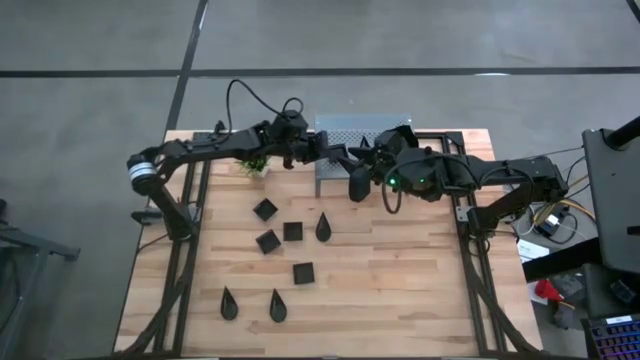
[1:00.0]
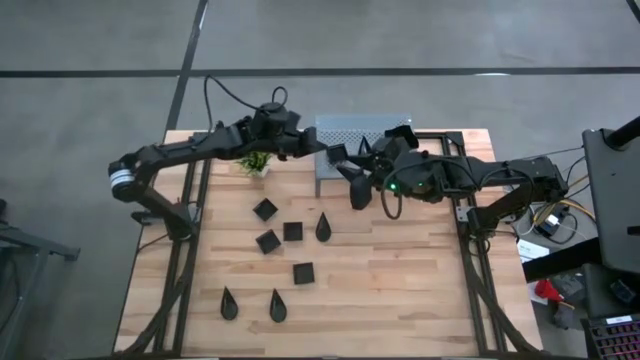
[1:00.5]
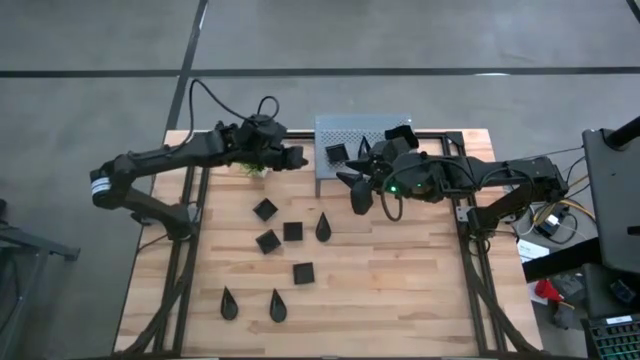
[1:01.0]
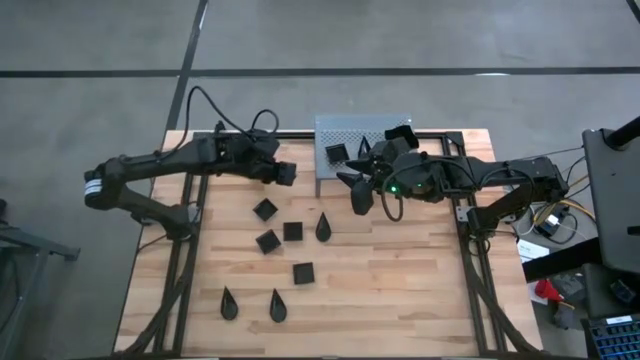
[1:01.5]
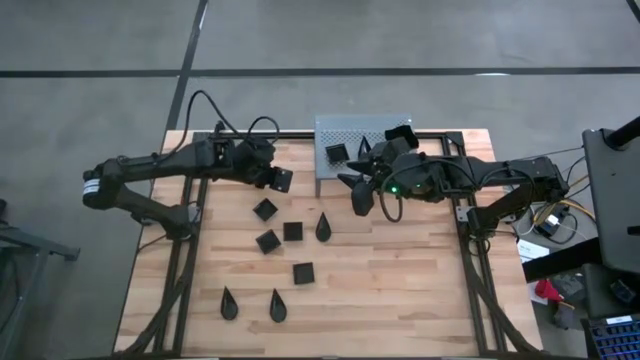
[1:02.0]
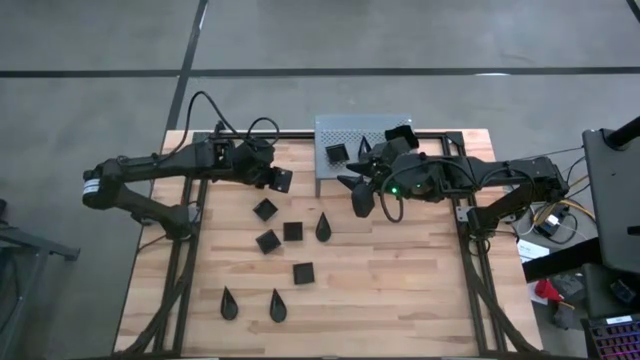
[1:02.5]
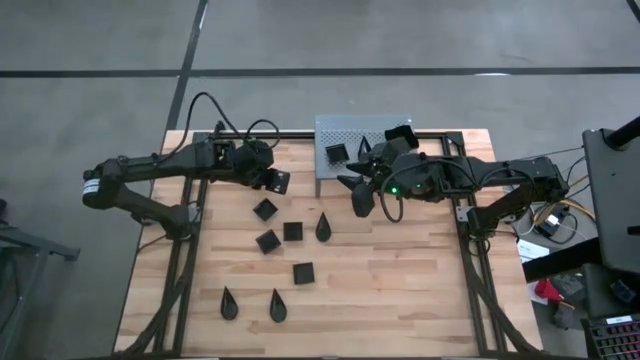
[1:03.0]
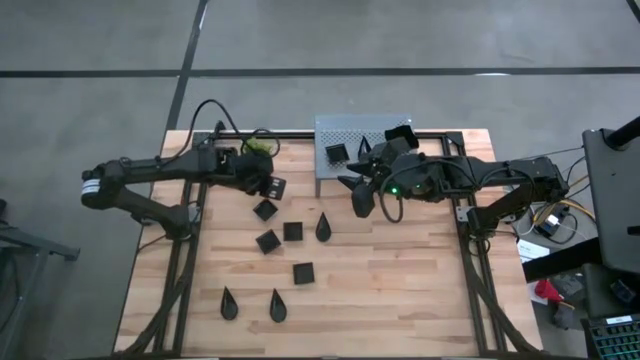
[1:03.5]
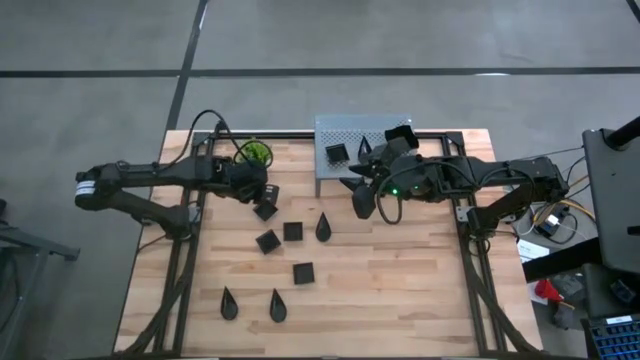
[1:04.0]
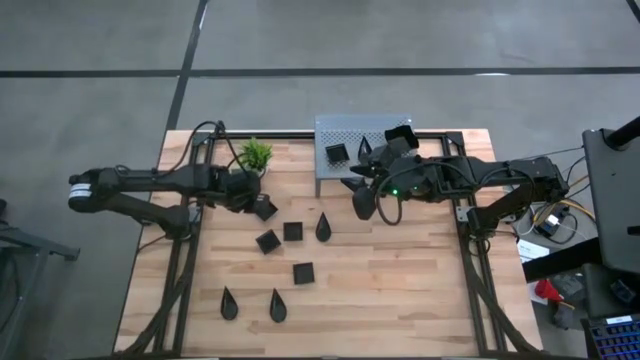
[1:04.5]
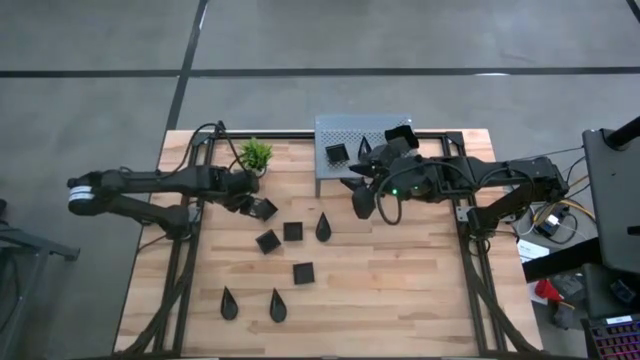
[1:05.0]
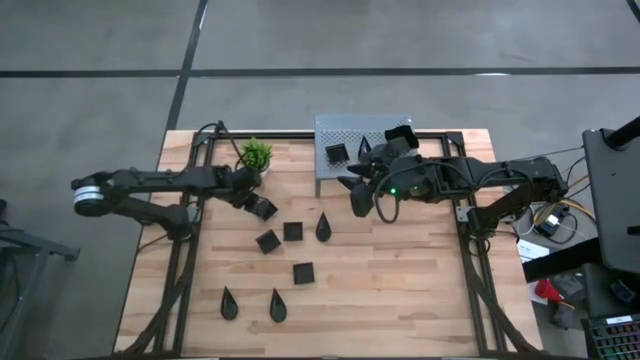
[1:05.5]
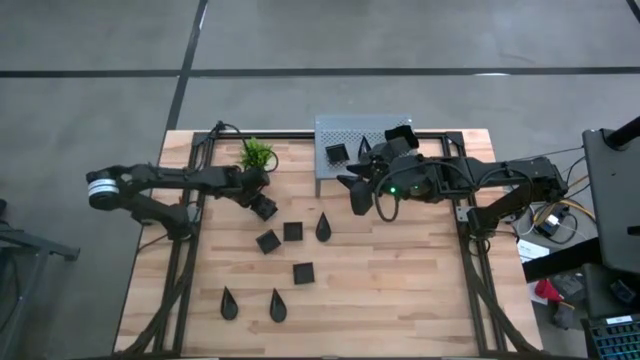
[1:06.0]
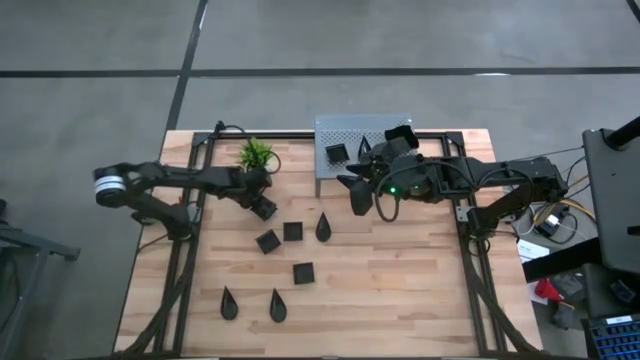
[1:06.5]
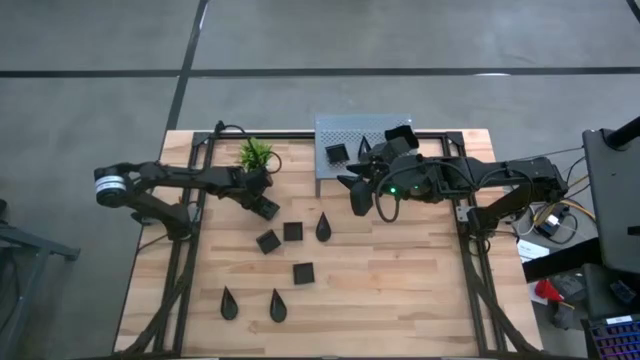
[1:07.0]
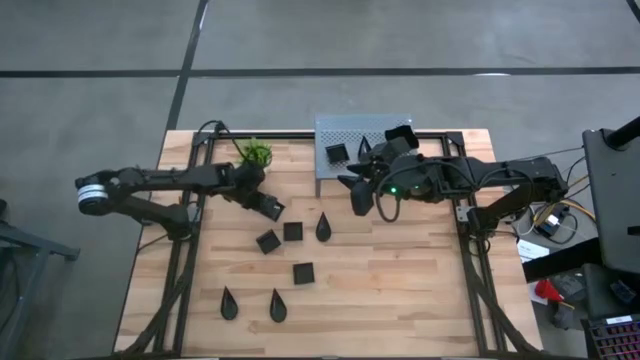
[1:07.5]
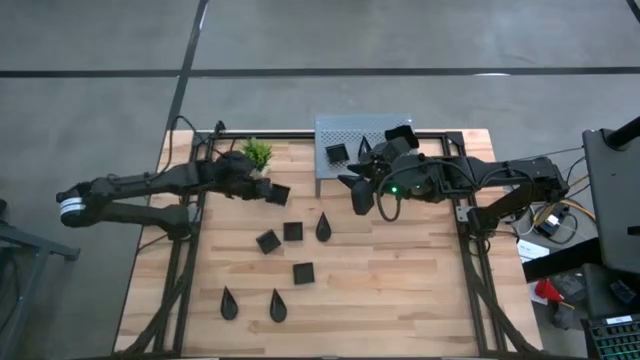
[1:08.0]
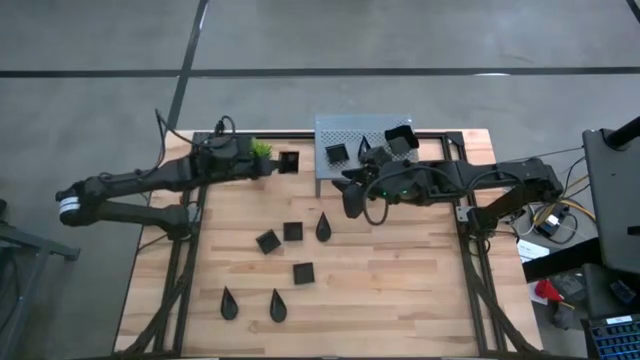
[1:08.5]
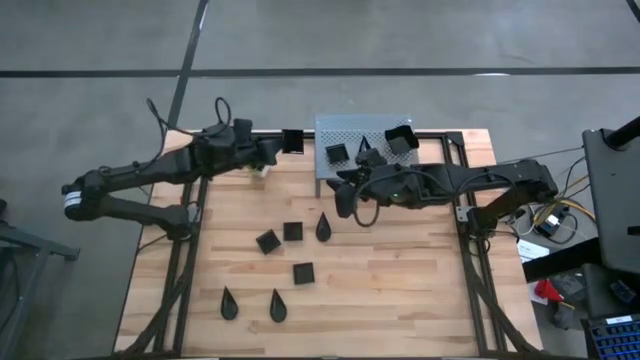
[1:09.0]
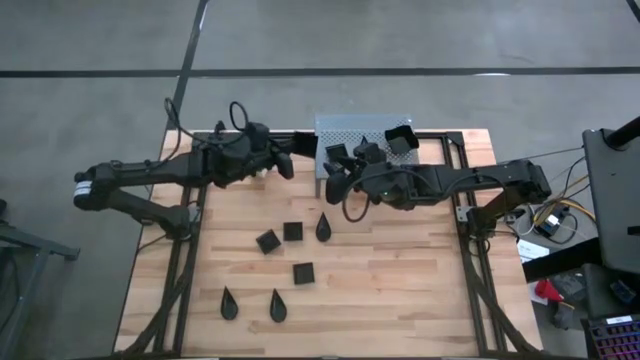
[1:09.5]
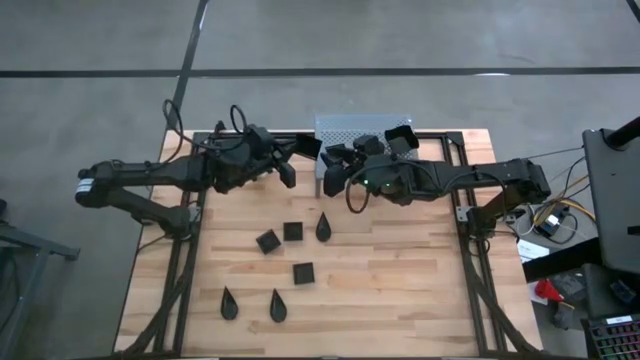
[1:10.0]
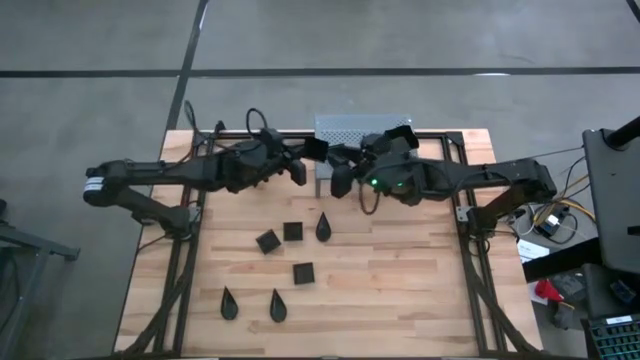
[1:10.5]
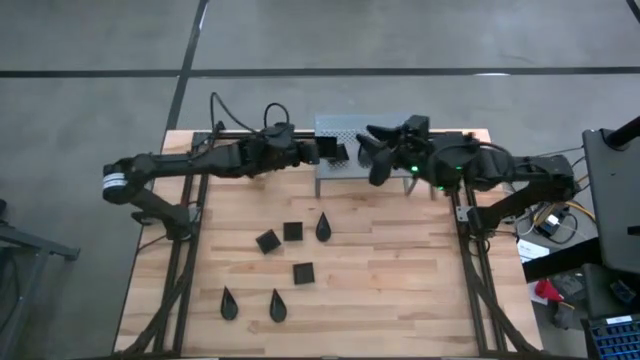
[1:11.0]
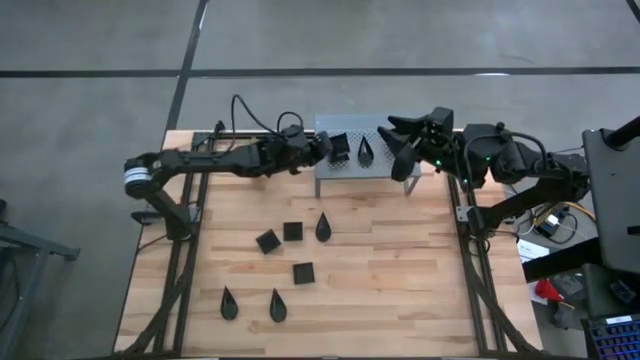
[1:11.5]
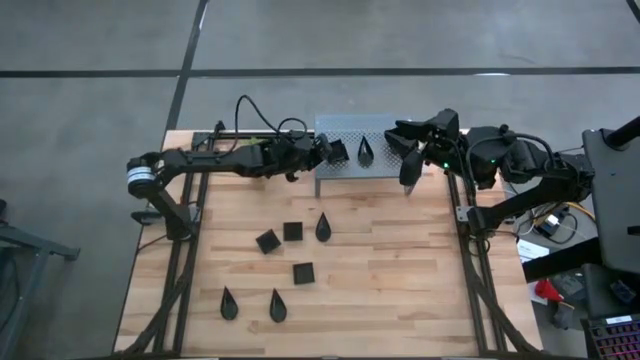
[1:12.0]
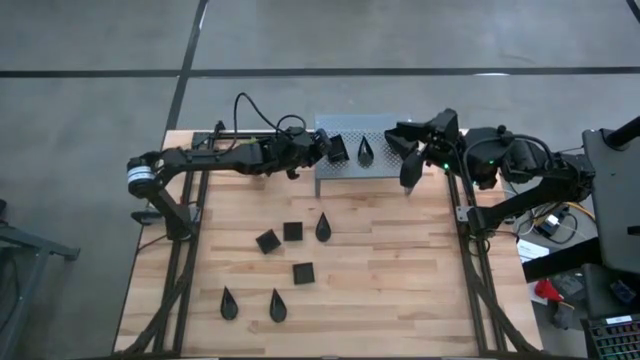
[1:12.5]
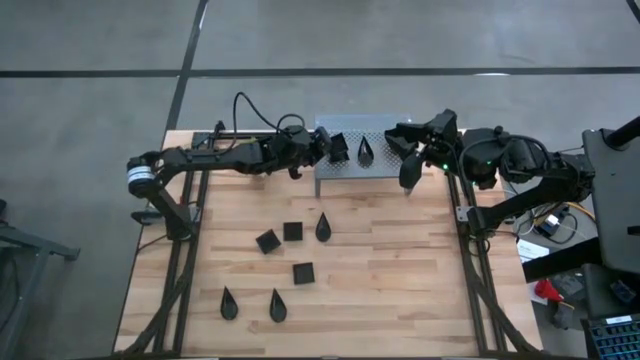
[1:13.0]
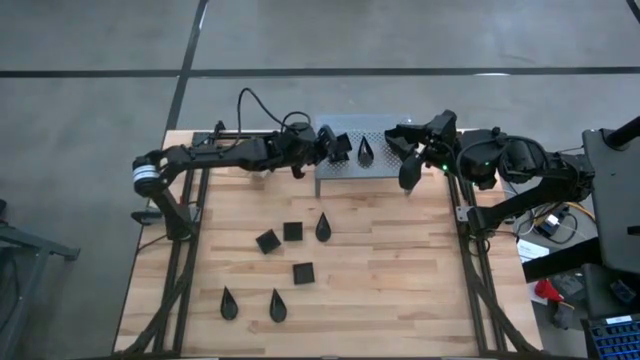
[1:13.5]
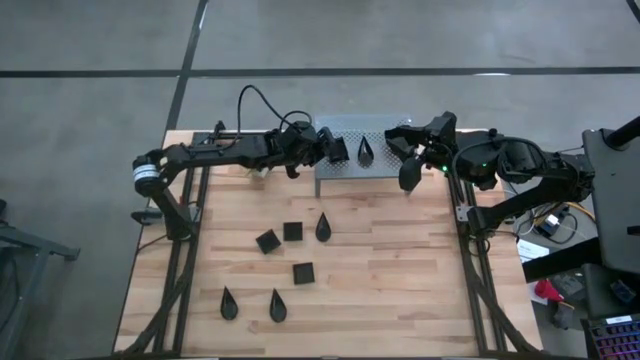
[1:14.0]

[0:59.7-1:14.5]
Task: Pick & Place Mini shaped plates
Stack the black square plate on top of the black square plate on the shelf

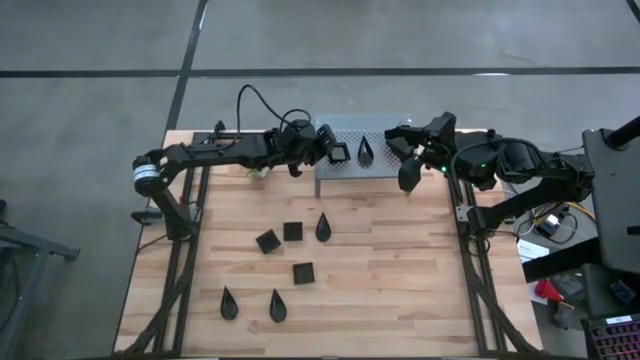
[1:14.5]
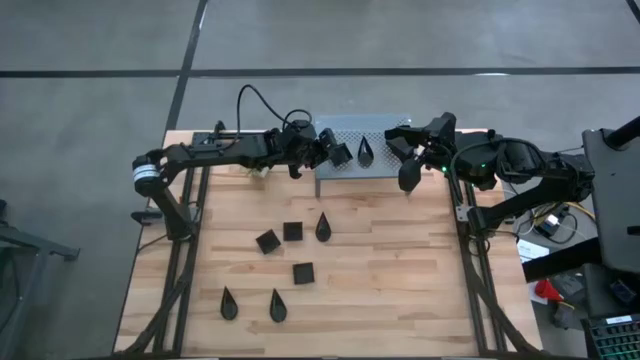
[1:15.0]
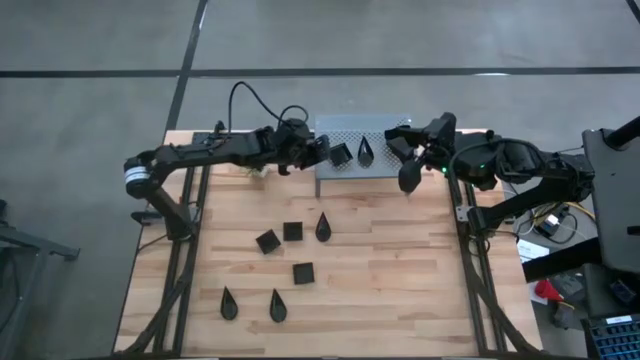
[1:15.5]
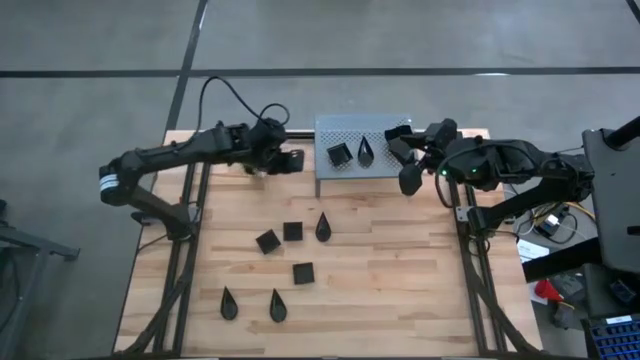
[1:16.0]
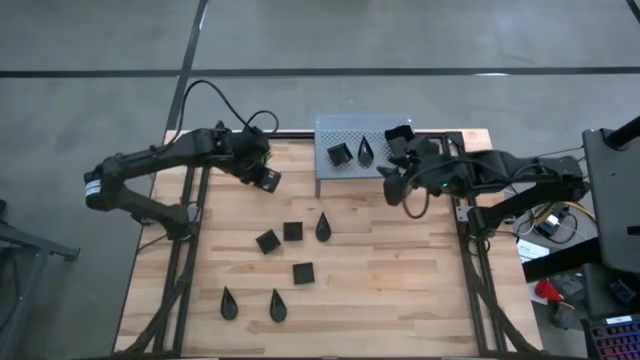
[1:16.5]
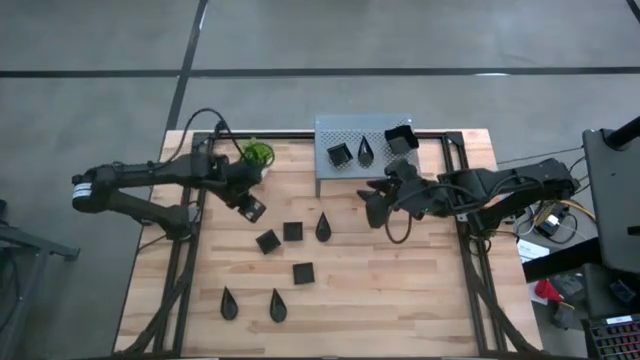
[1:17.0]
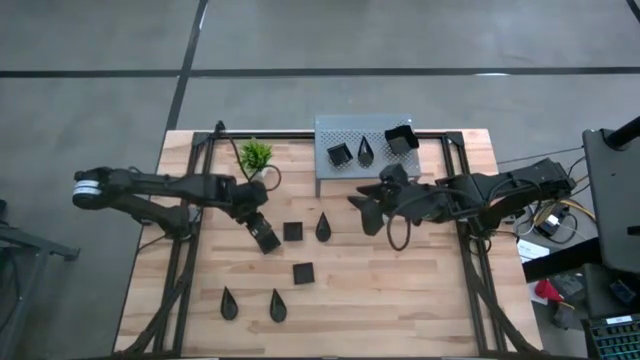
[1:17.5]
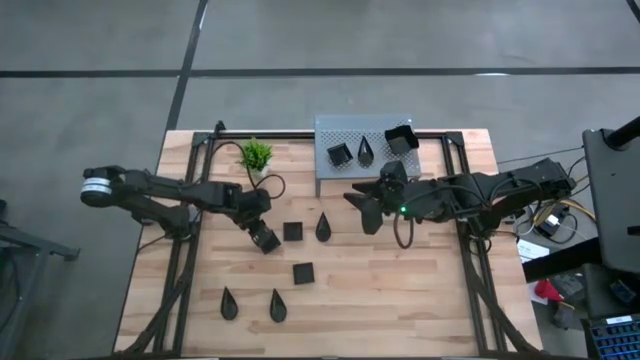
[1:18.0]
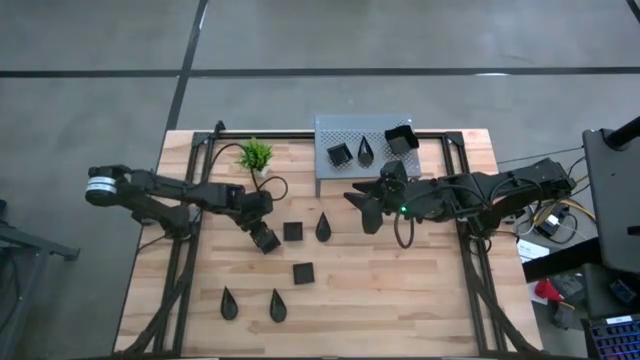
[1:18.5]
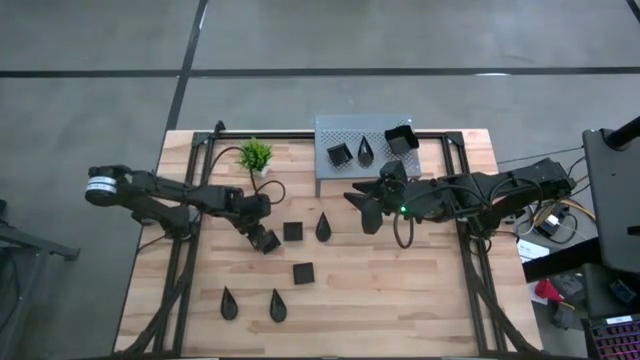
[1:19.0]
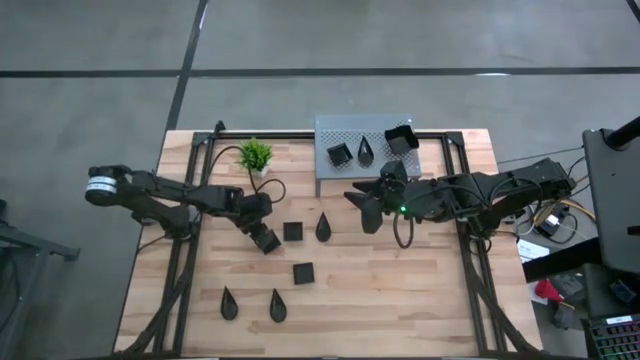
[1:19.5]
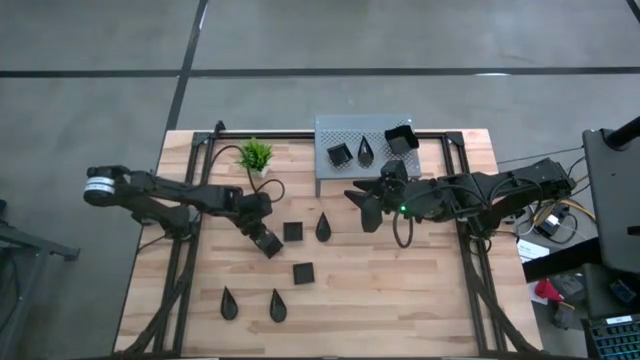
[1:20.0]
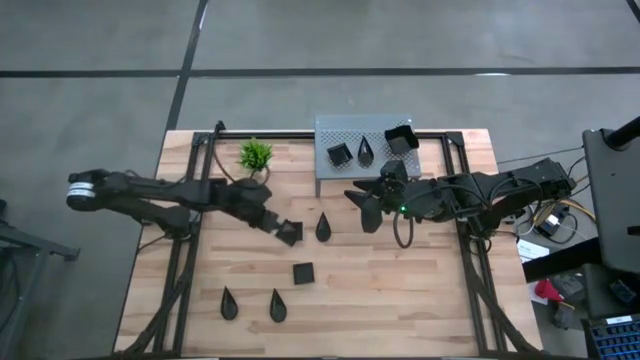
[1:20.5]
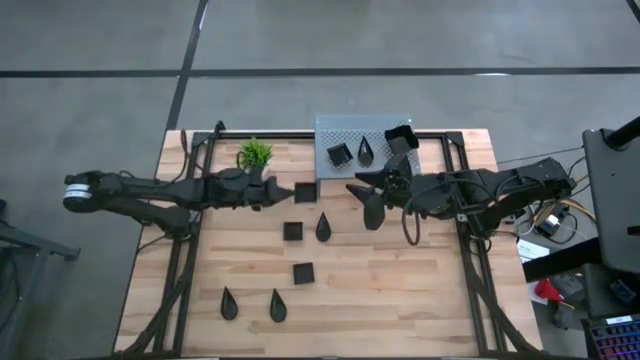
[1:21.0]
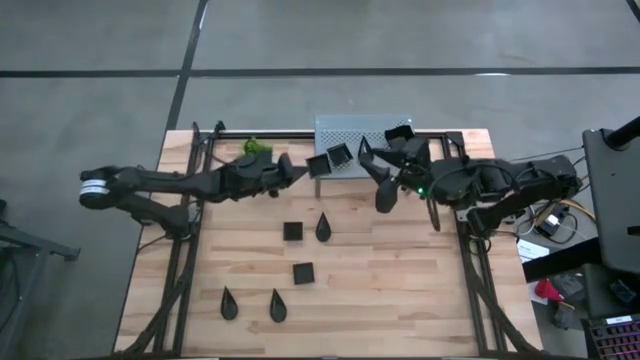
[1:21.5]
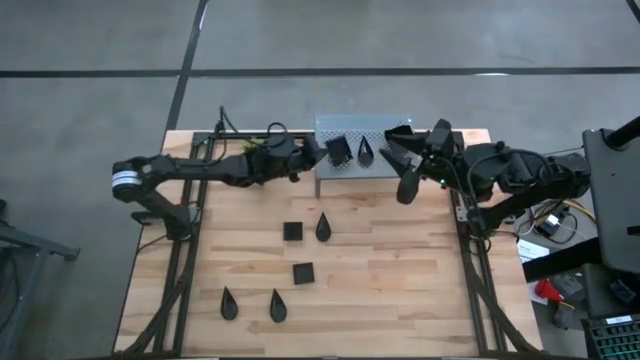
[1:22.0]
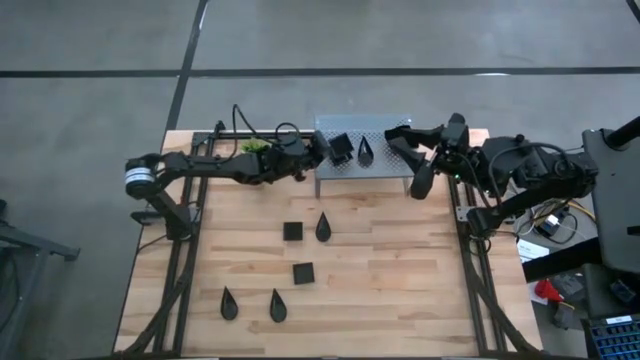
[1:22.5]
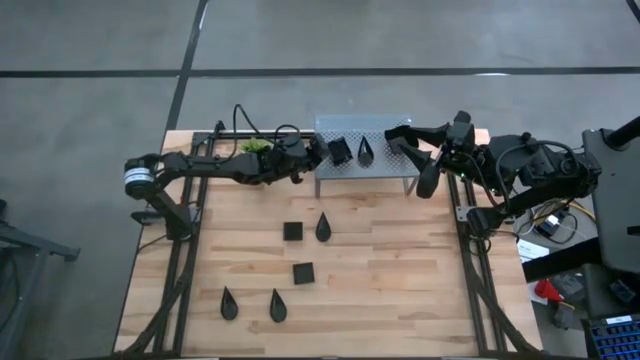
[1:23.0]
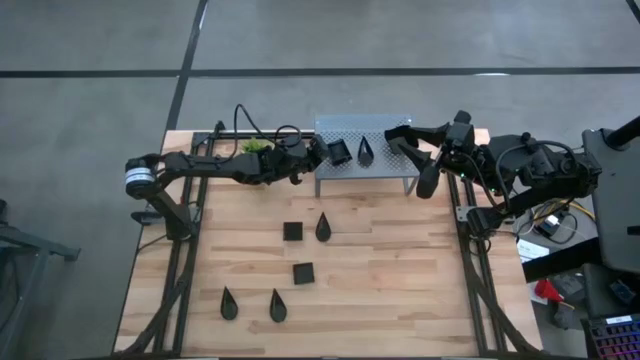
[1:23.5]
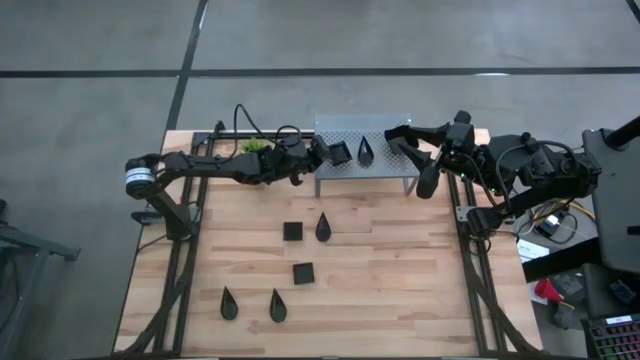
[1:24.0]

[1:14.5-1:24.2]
Stack the black square plate on top of the black square plate on the shelf
